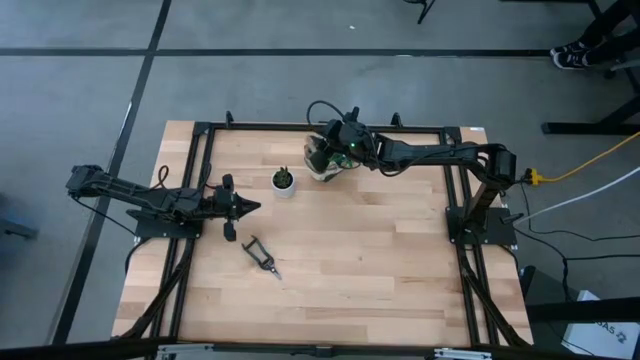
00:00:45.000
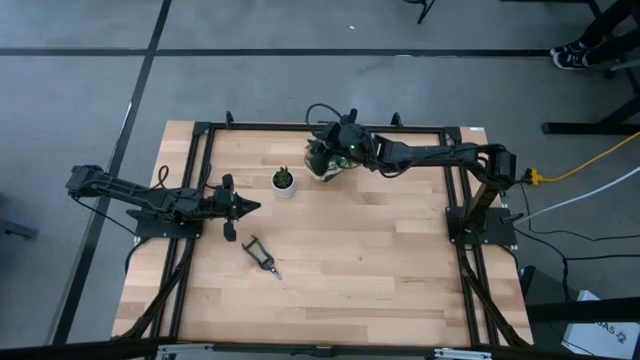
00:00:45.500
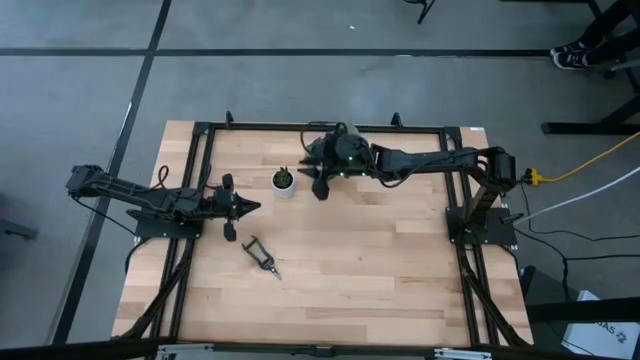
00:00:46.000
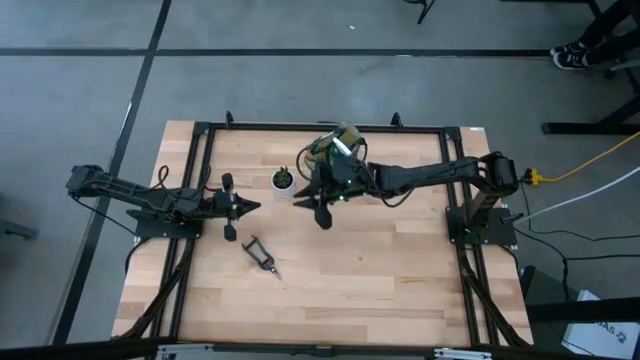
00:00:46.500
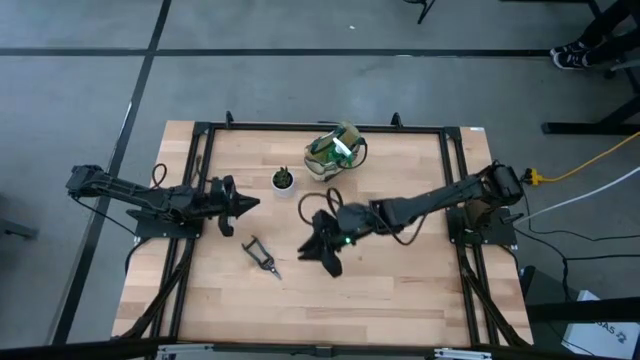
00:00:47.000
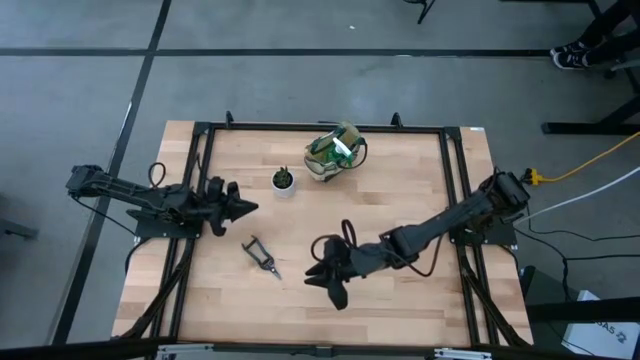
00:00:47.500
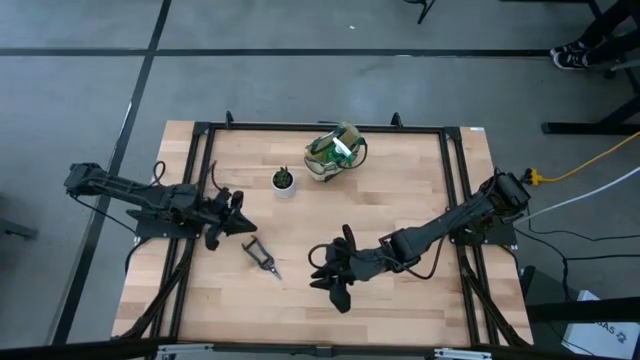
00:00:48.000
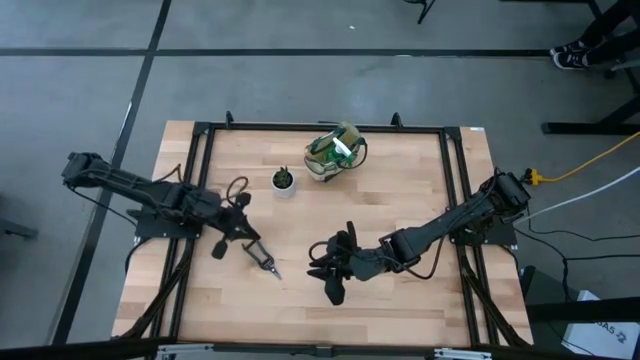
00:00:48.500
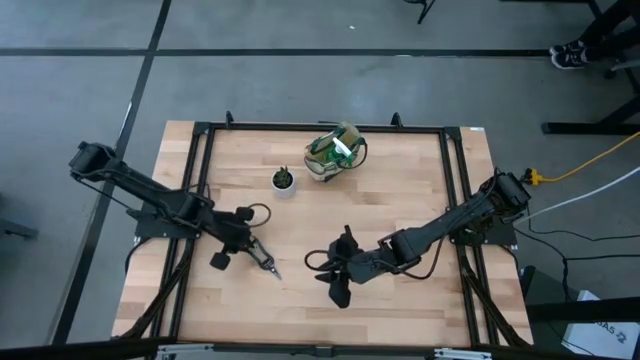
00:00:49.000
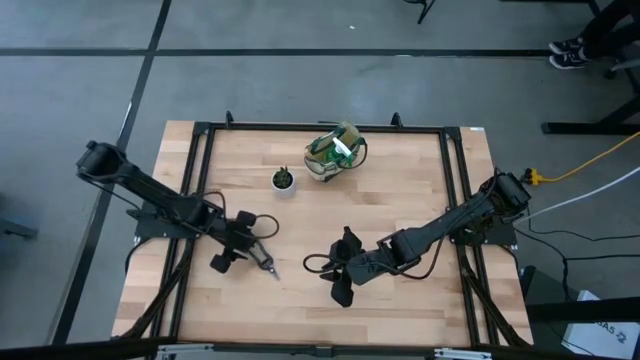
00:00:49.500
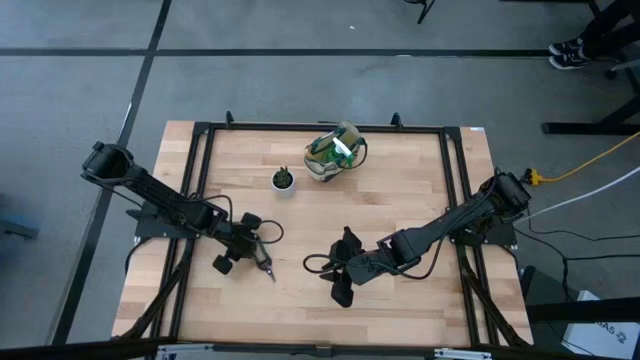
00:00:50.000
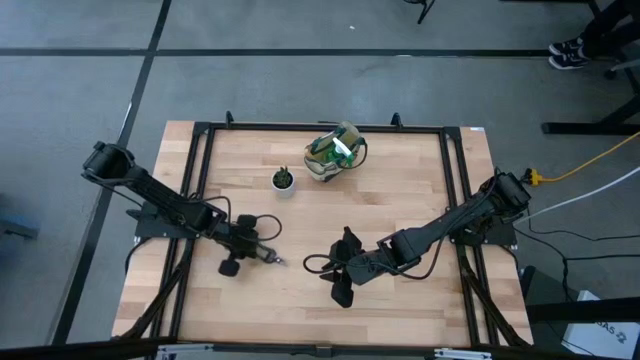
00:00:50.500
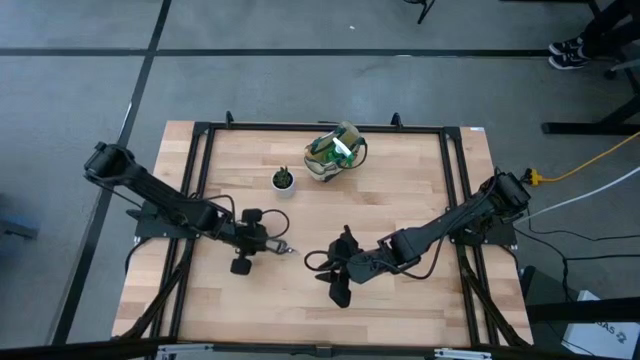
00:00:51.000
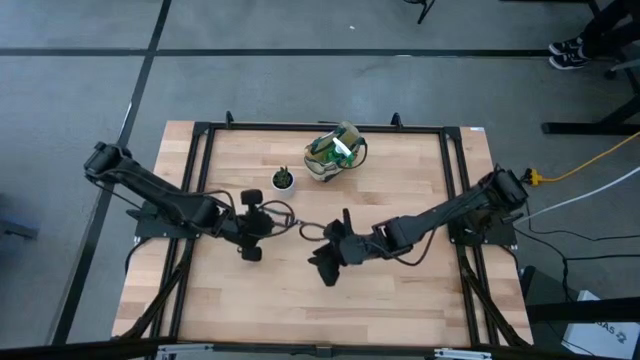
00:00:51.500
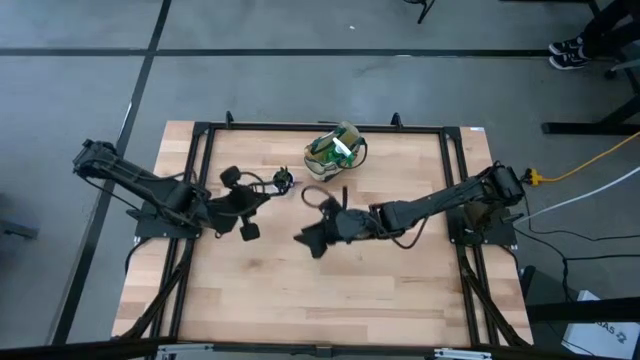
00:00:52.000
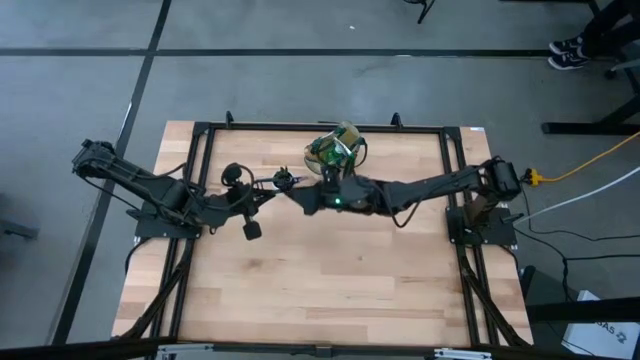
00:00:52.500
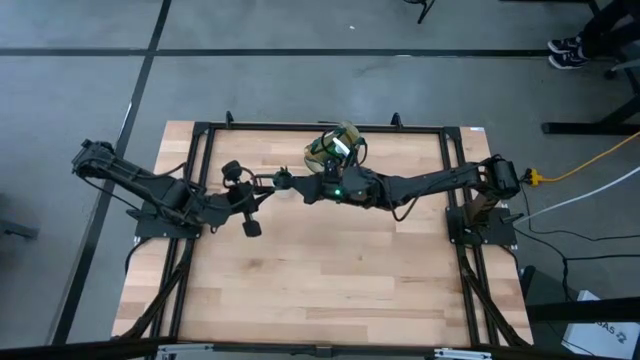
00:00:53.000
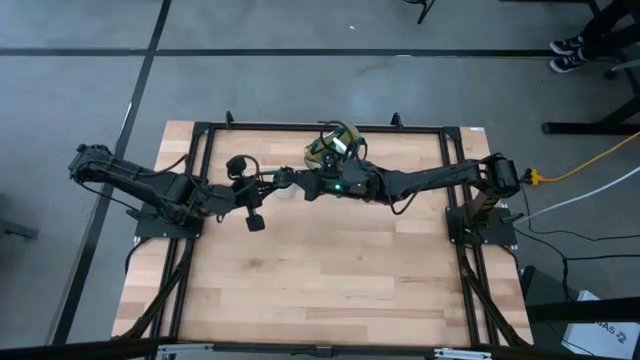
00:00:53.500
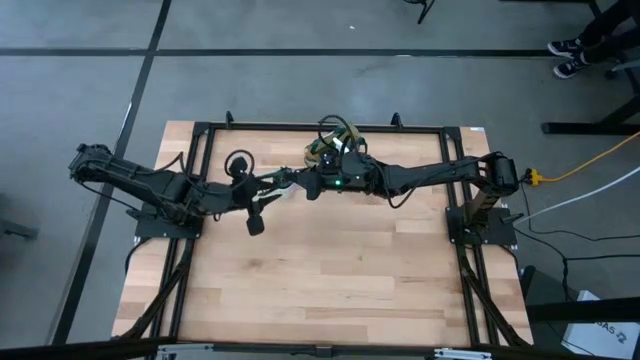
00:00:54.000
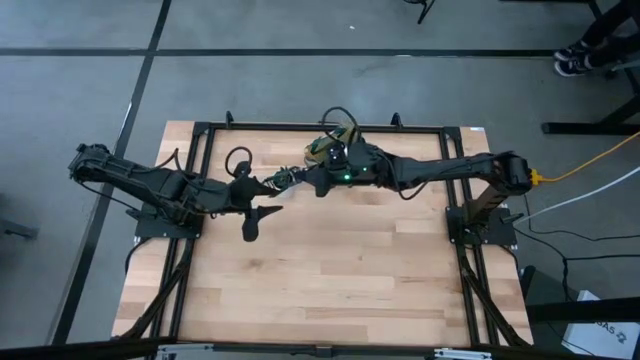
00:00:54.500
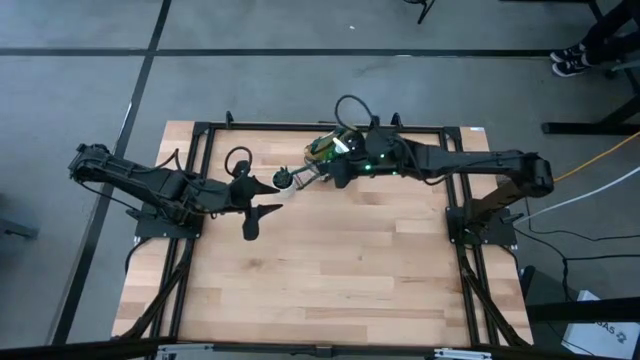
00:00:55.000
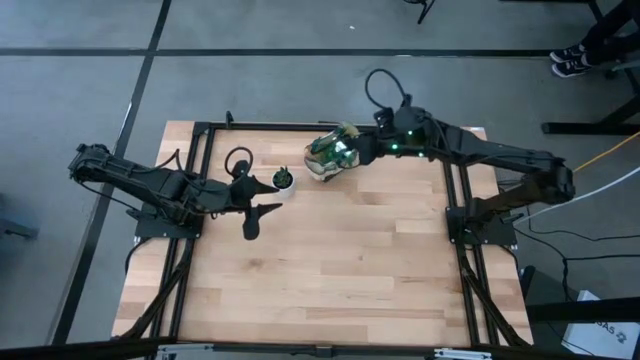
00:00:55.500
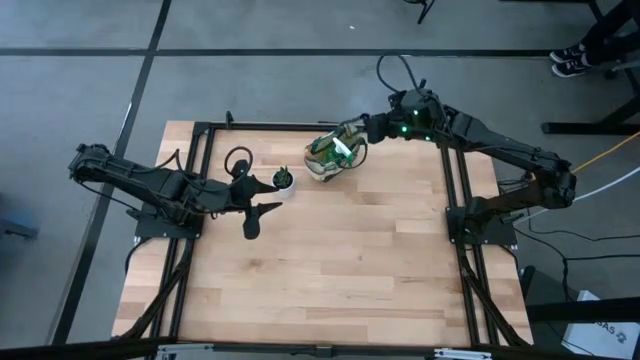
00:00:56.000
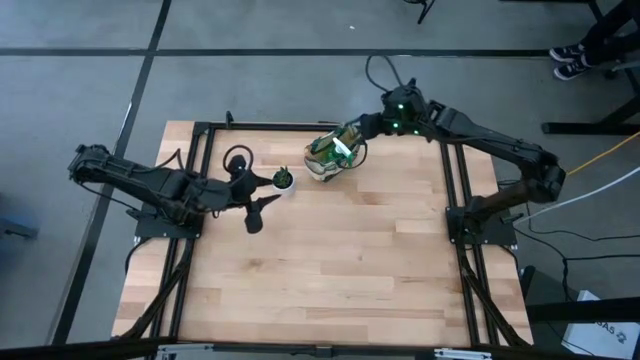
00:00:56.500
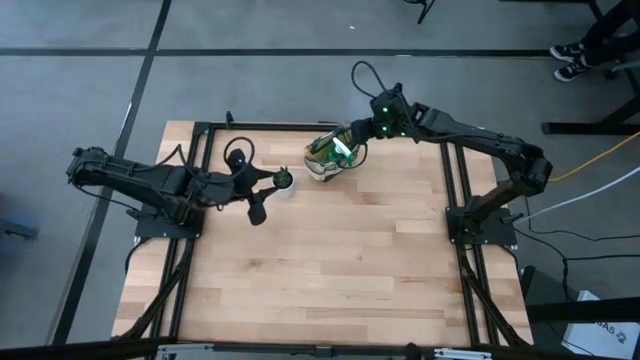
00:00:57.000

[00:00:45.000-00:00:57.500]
Task: Pick & Place Garden tools in Gardening bag
Put the shear scissors into the gardening bag

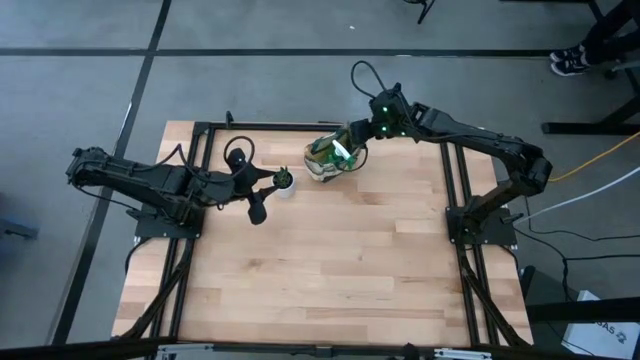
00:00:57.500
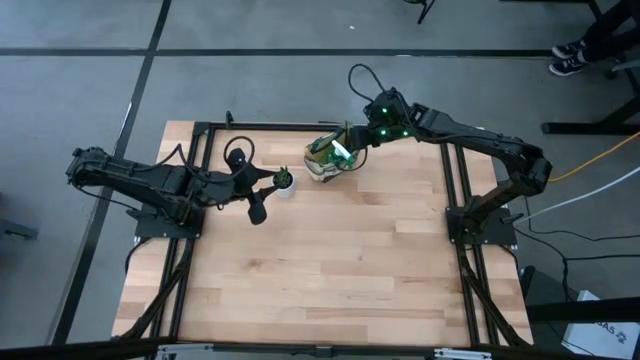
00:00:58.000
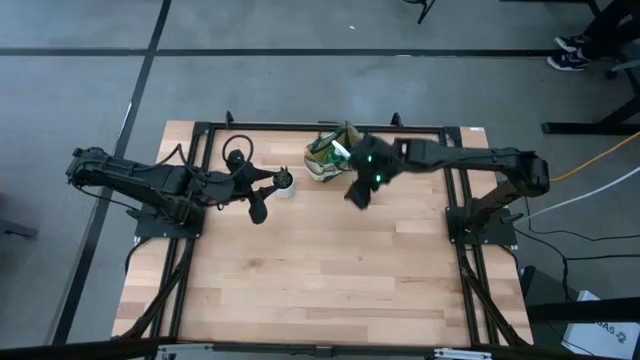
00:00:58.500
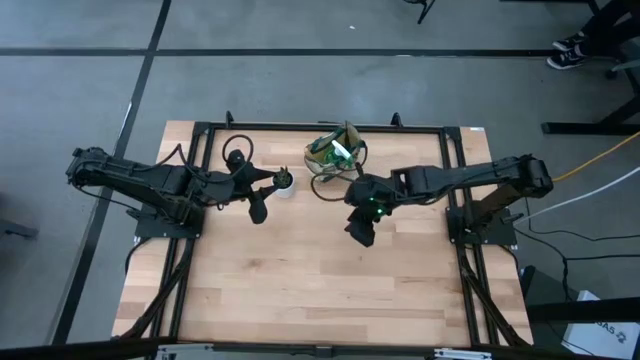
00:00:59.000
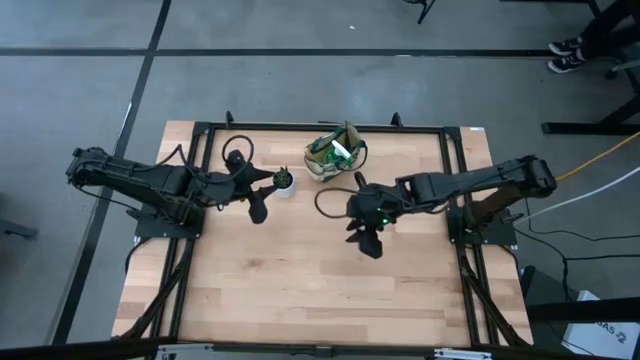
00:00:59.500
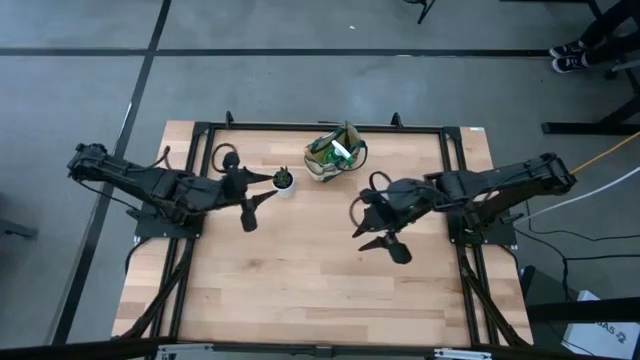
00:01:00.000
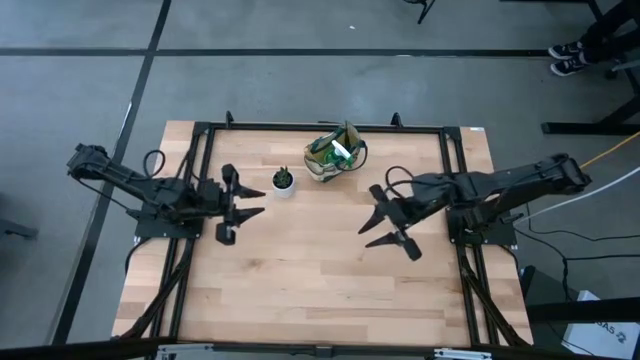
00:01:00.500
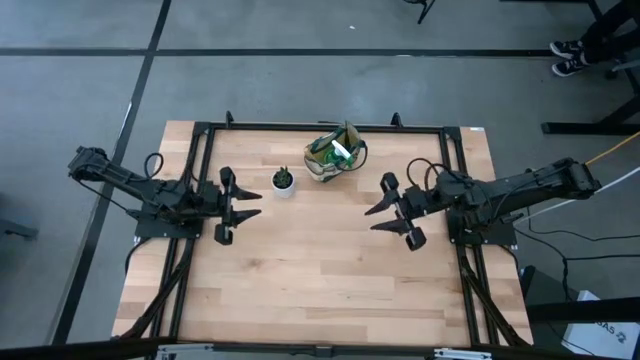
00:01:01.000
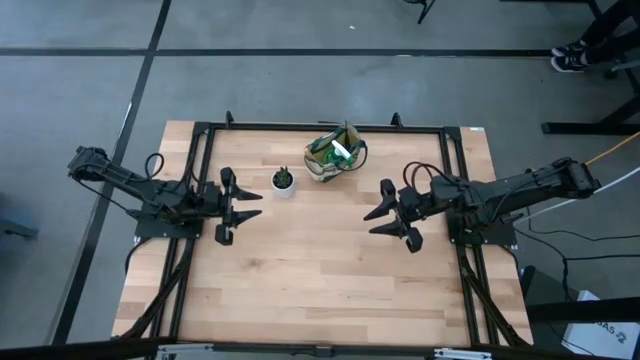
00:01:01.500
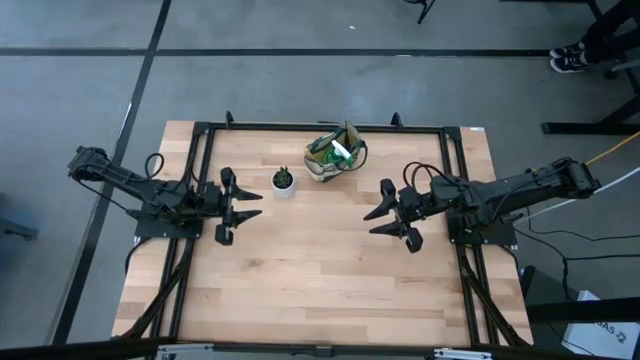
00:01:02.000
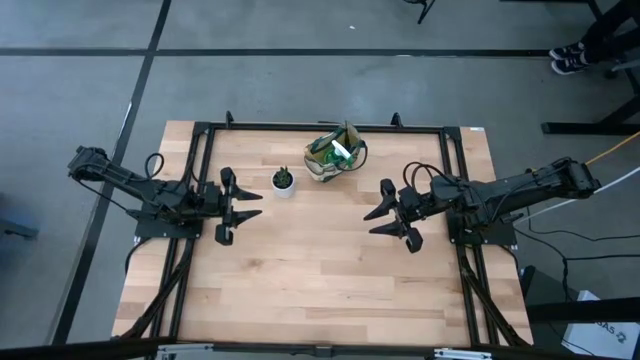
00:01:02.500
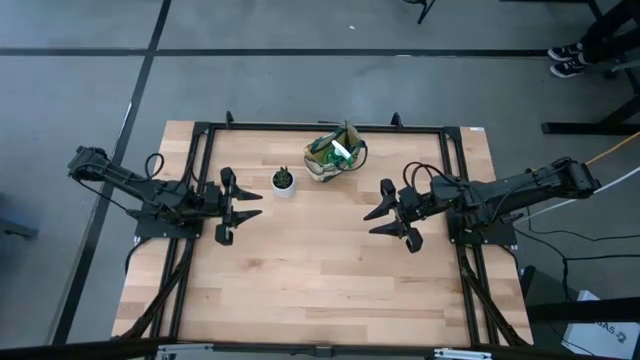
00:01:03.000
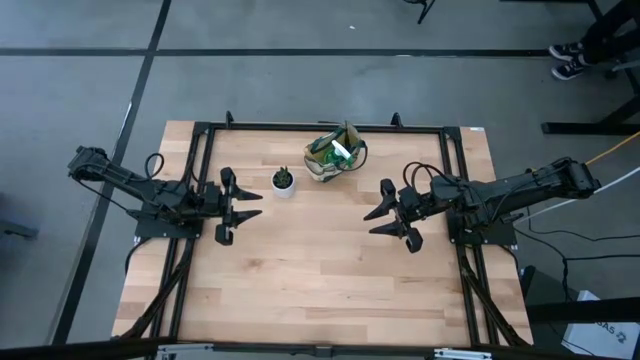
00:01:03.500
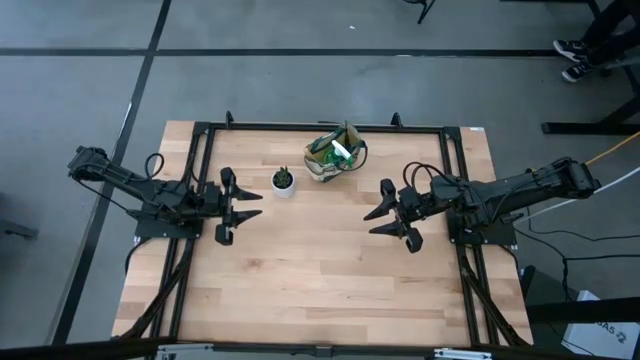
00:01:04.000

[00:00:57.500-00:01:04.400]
Return to Home Position

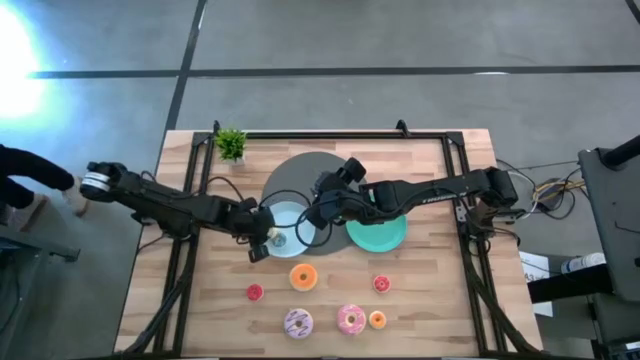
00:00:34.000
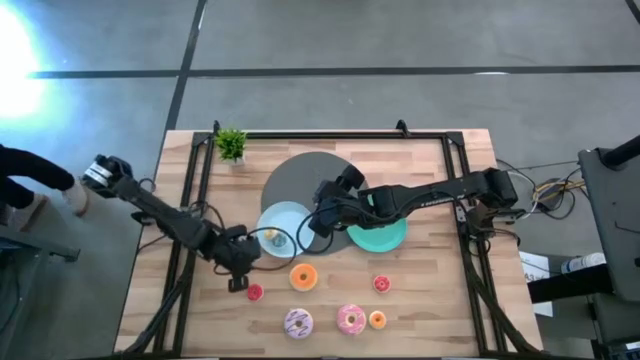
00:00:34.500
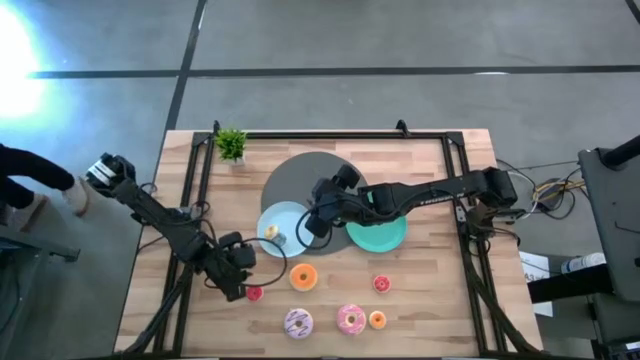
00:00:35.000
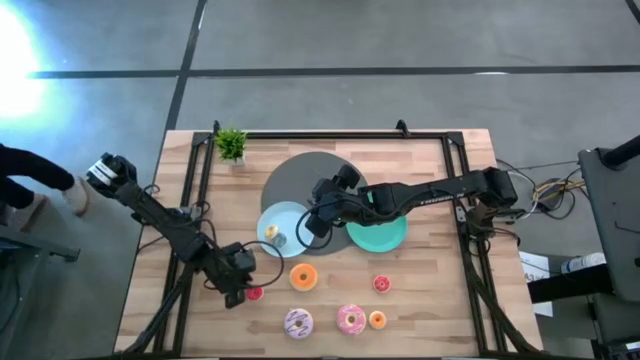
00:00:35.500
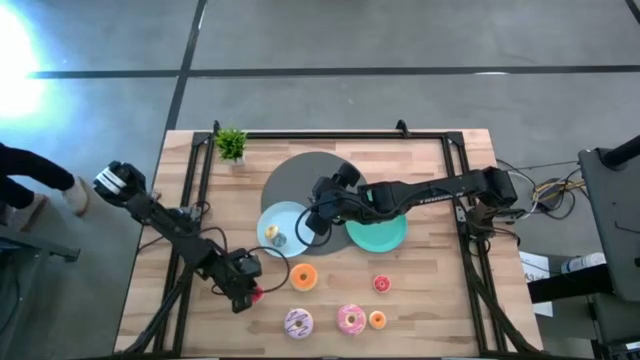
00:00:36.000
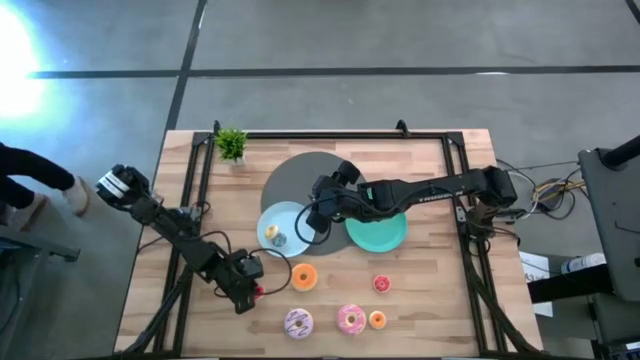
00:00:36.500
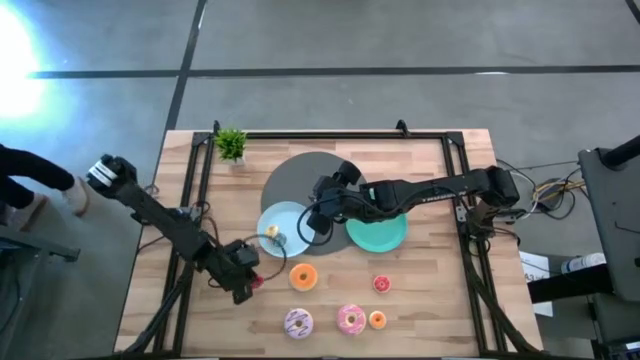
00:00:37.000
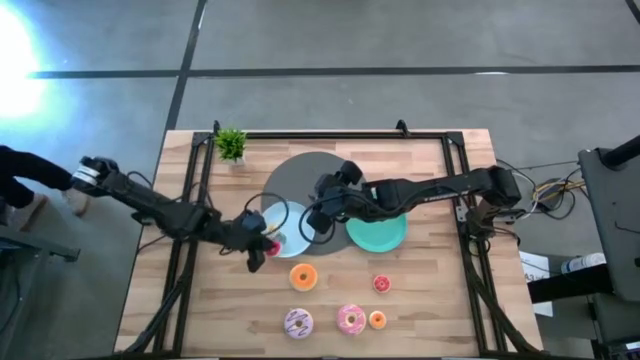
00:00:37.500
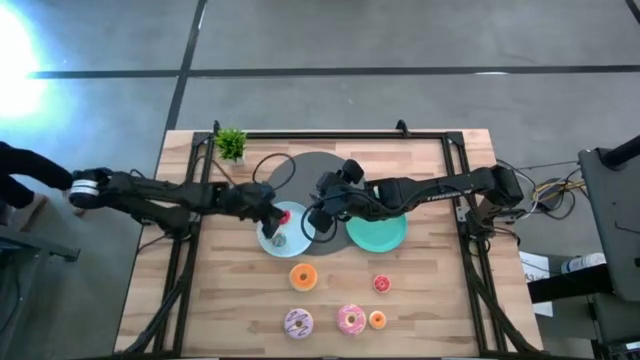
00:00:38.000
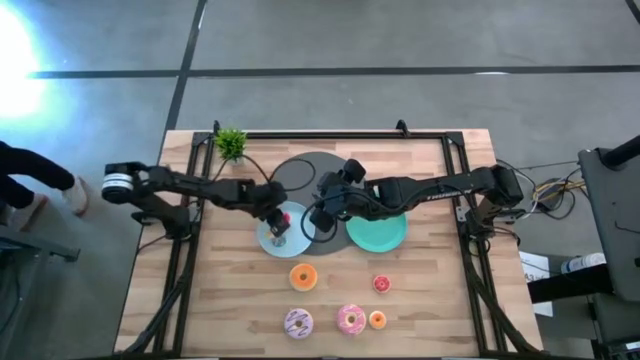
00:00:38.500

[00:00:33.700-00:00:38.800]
Task: Pick & Place donuts
Put the small red donut on the light blue plate
